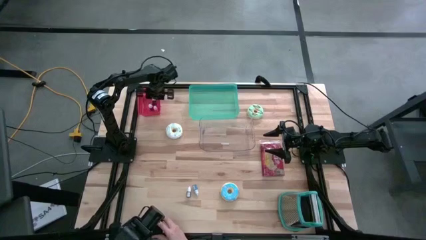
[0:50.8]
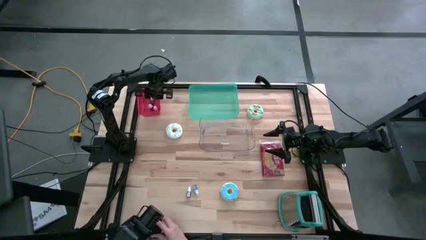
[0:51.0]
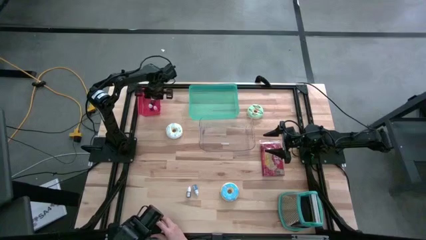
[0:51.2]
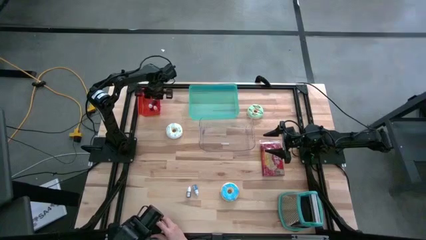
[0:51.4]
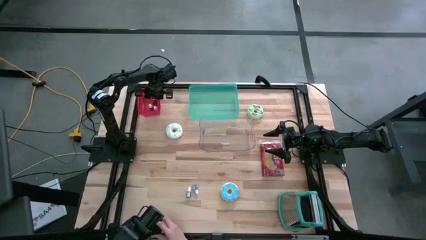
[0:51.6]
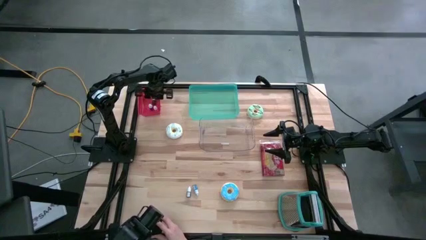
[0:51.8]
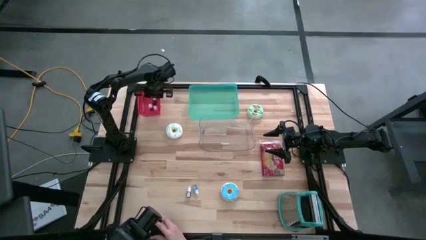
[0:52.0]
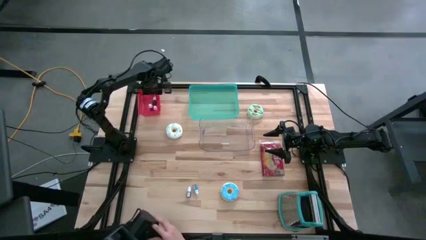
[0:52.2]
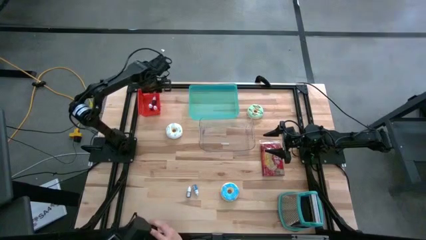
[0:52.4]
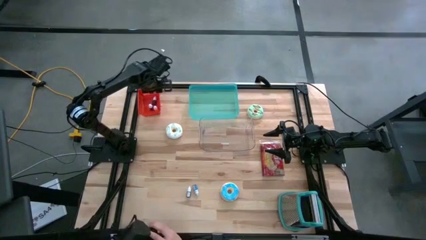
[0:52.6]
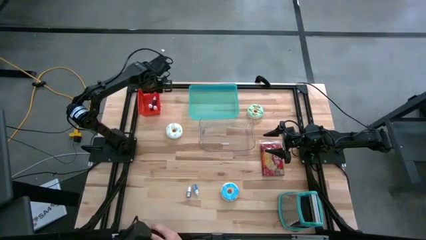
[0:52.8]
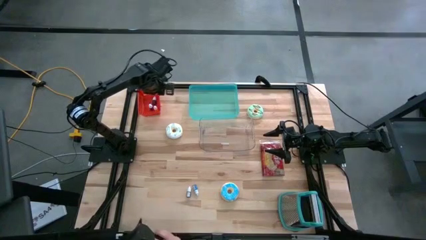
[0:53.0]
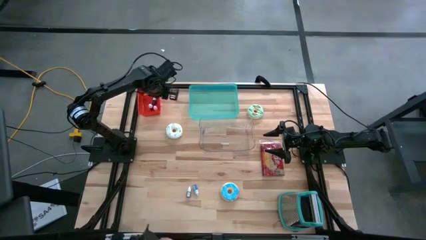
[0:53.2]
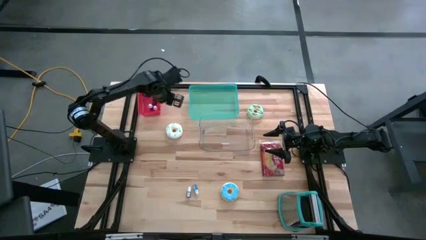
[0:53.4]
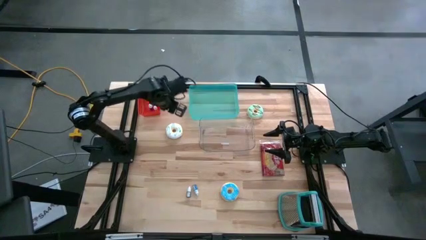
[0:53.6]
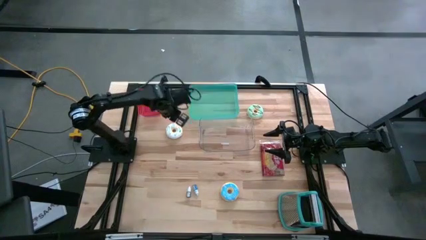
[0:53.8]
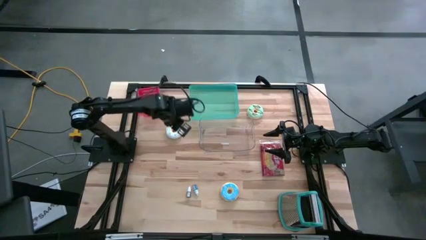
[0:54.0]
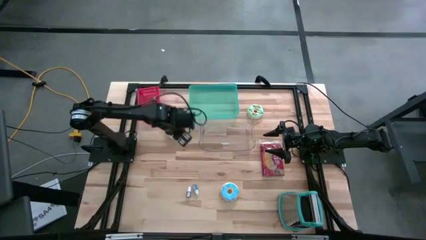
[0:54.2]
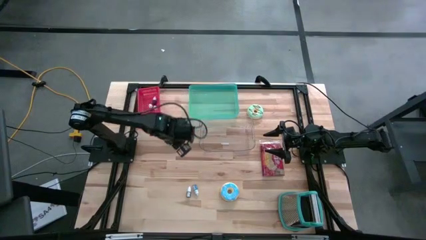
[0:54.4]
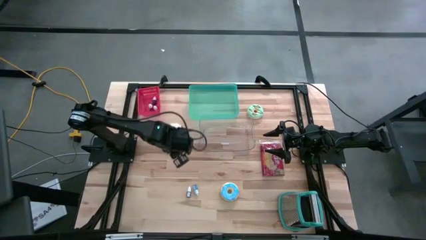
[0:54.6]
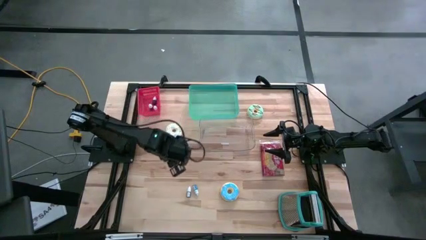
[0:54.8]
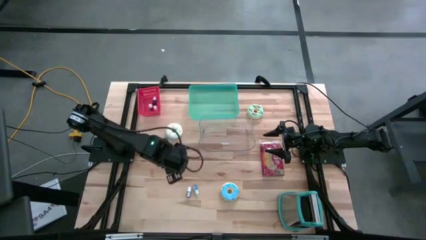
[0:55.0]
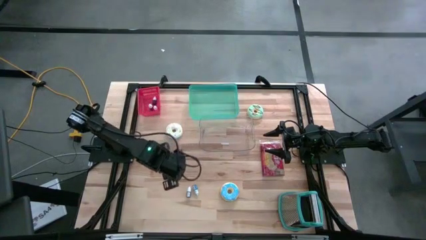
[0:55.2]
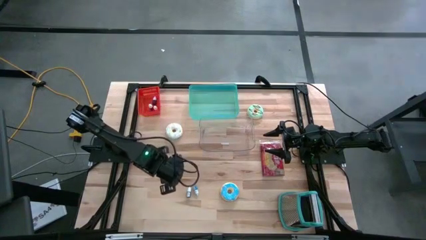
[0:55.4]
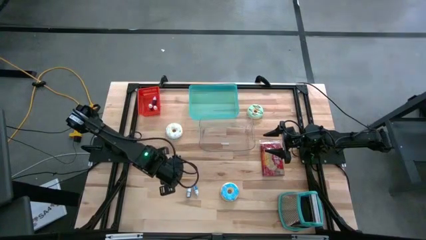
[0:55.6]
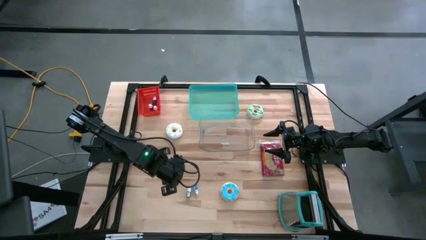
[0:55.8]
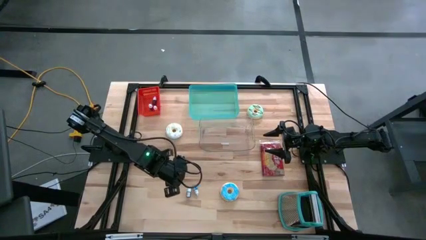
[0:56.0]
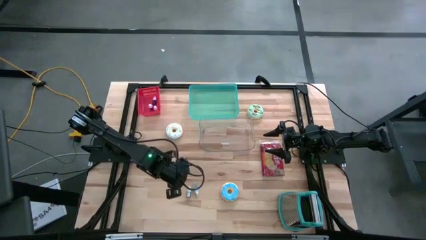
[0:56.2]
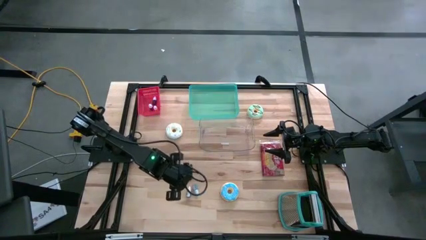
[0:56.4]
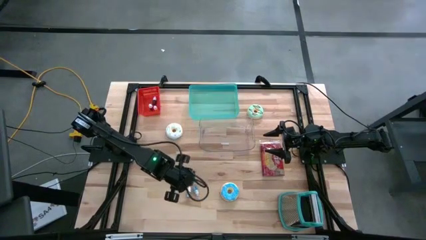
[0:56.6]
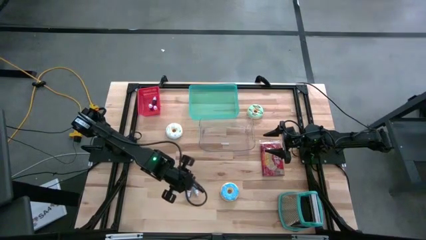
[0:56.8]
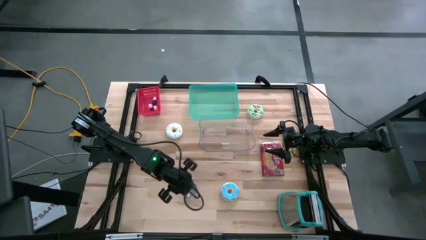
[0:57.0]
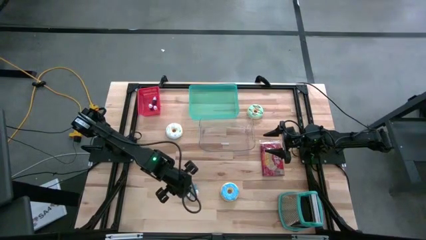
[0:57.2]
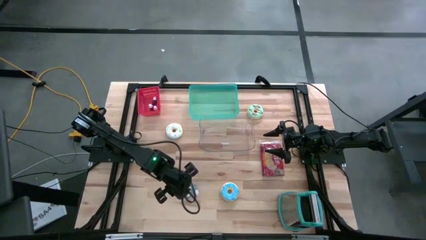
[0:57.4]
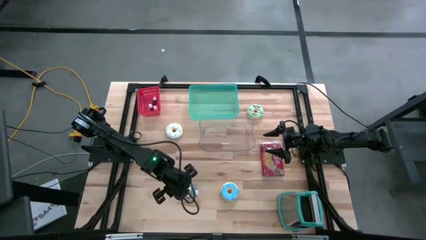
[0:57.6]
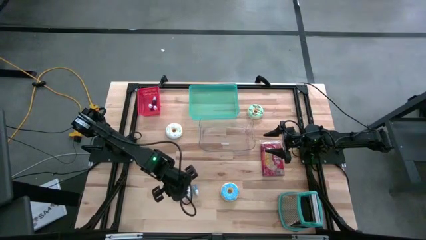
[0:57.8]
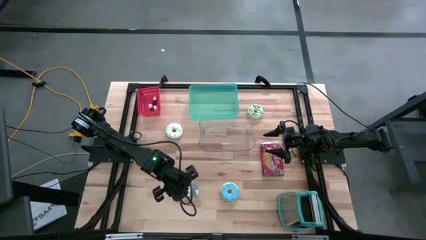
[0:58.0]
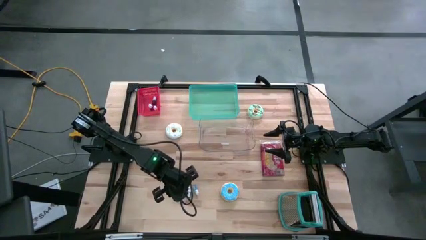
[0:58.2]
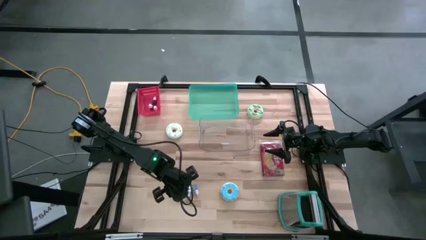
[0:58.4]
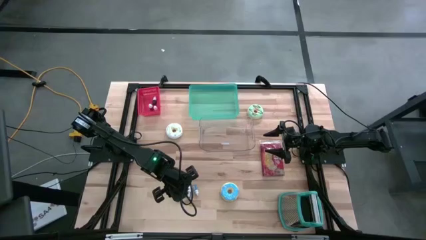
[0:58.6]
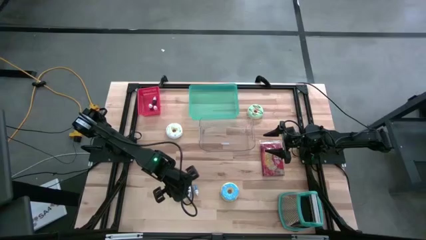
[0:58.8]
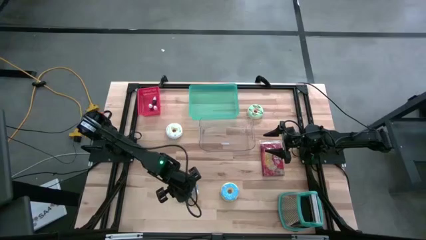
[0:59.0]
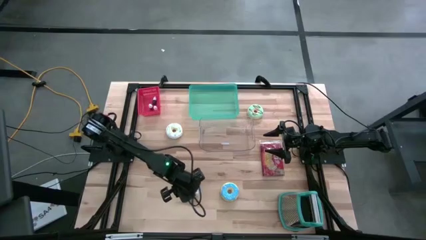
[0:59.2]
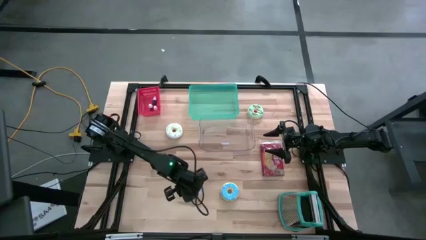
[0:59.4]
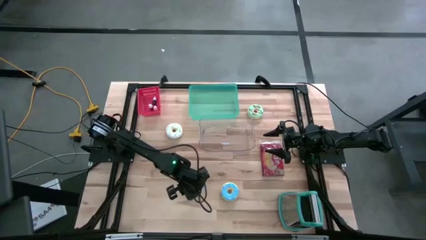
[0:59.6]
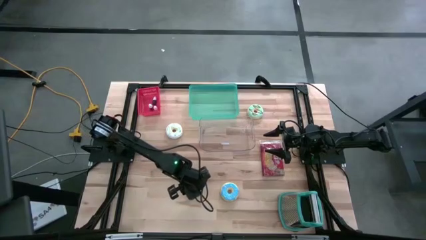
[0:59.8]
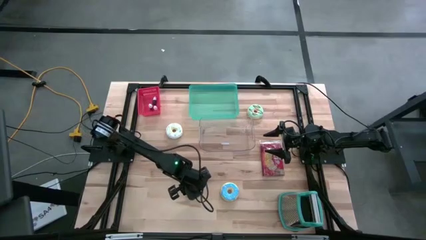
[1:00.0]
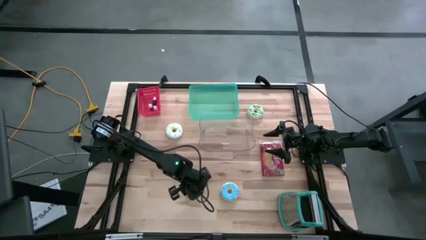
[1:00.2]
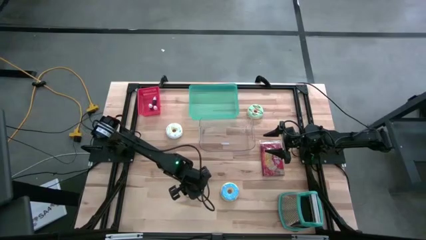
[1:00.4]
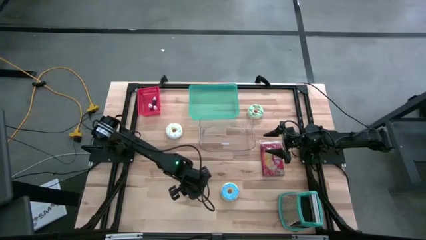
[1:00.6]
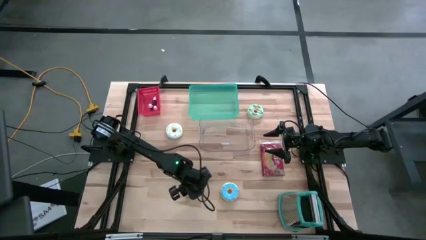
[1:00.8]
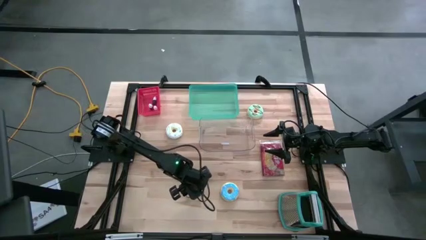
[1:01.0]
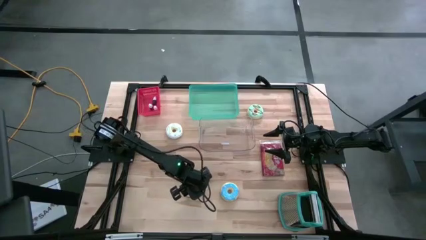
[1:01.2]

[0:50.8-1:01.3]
Put the blue food coloring bottle into the red bin
